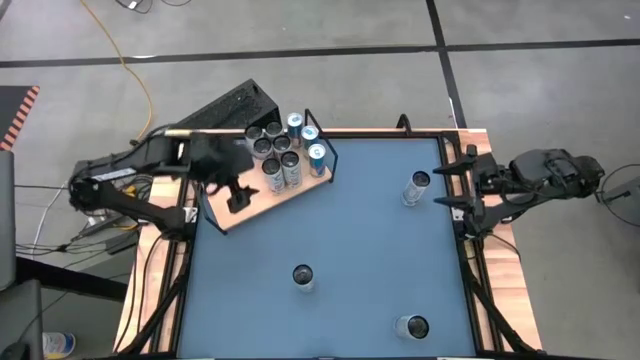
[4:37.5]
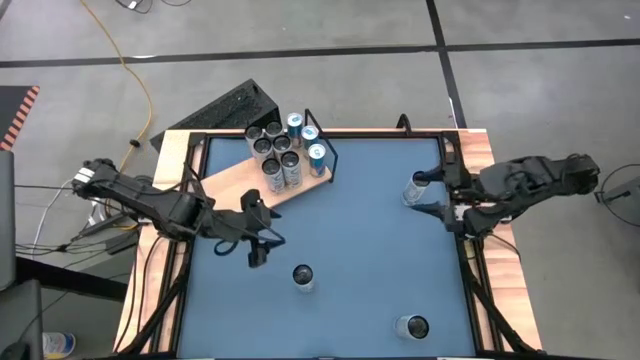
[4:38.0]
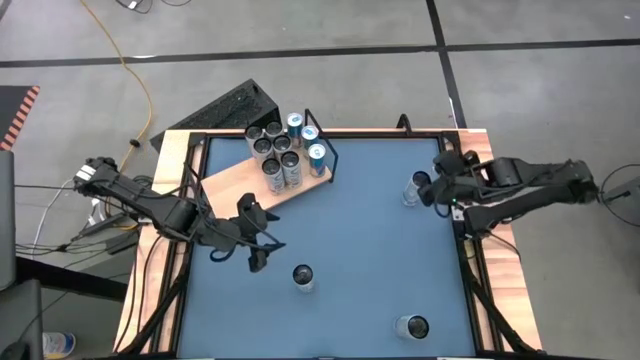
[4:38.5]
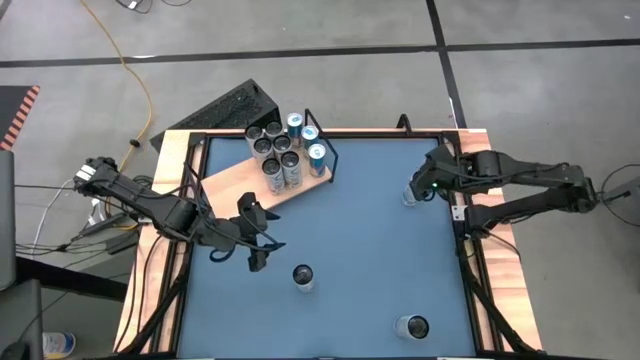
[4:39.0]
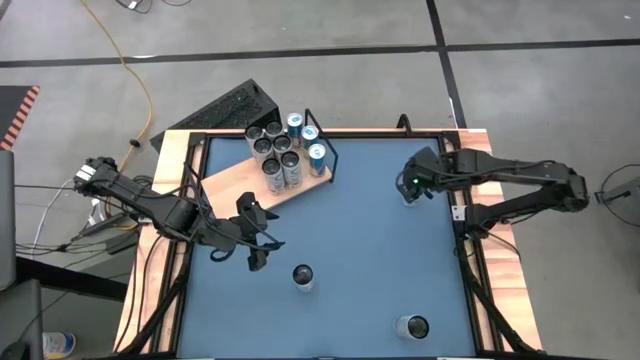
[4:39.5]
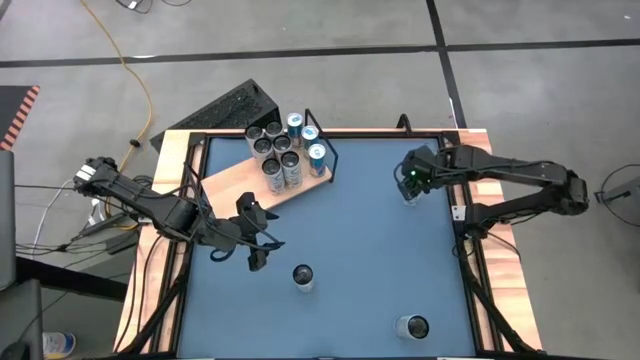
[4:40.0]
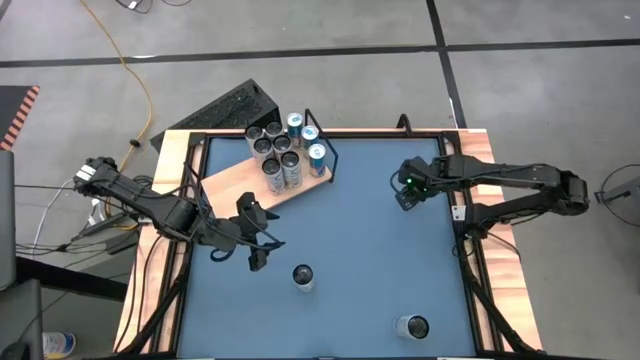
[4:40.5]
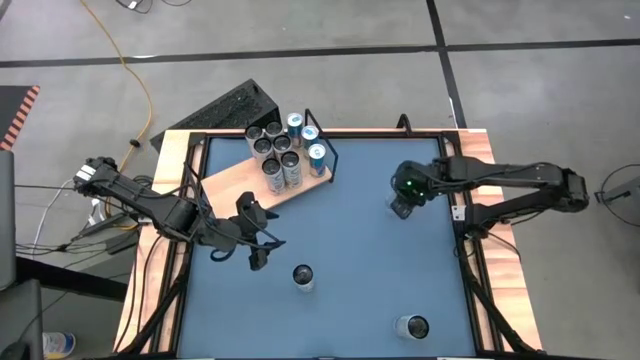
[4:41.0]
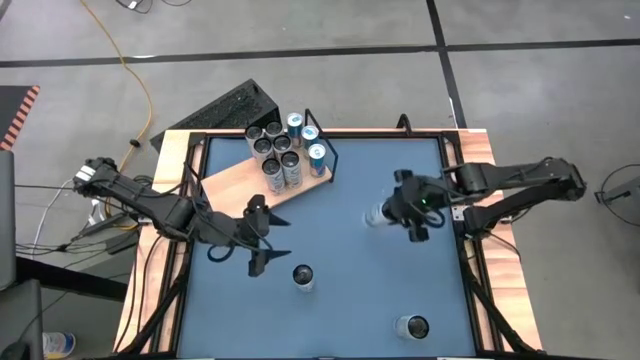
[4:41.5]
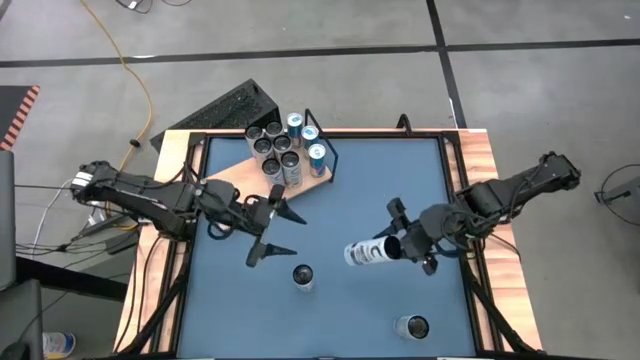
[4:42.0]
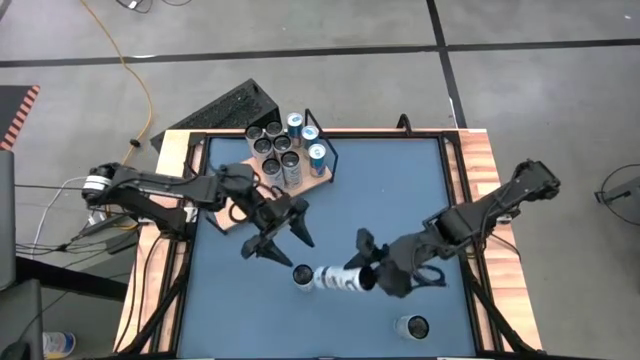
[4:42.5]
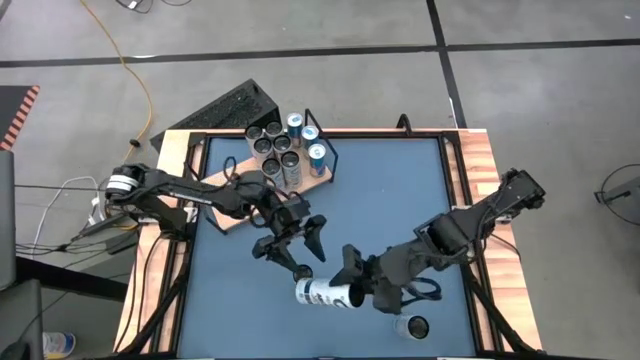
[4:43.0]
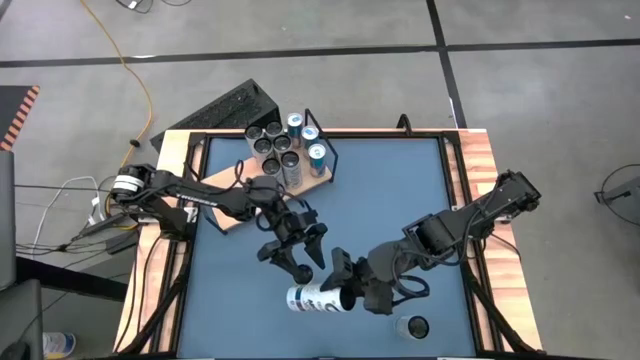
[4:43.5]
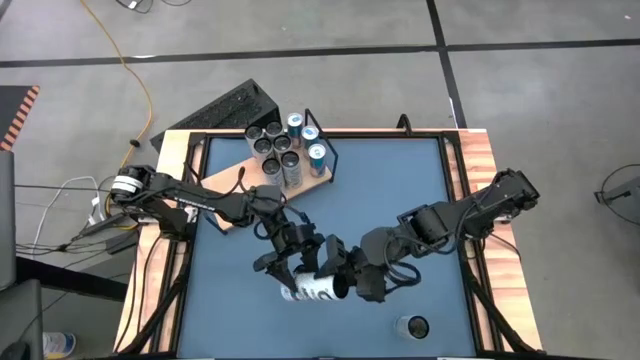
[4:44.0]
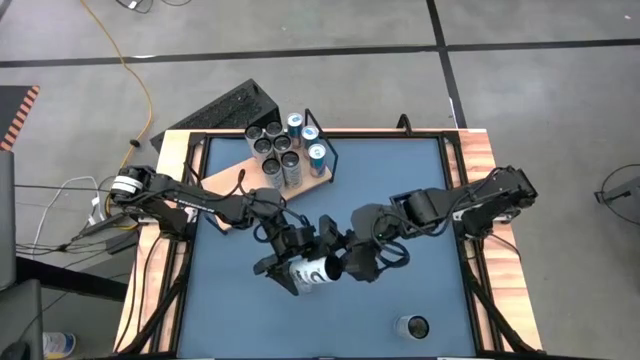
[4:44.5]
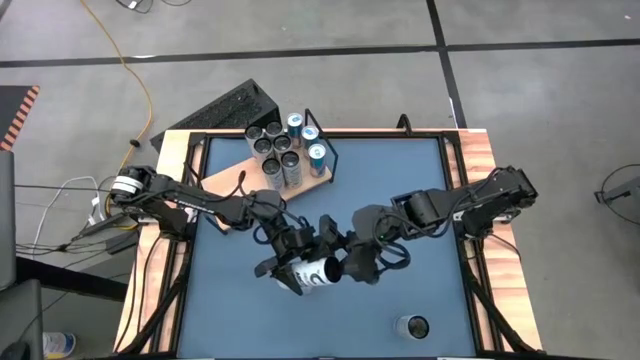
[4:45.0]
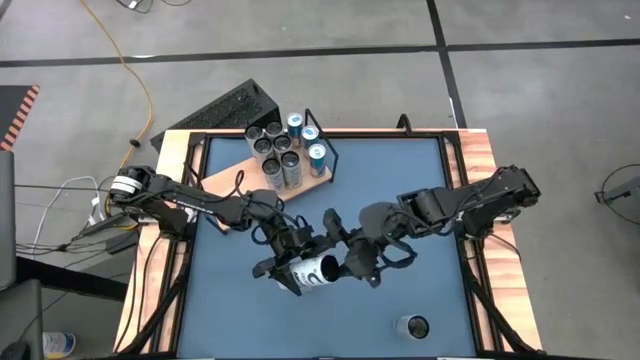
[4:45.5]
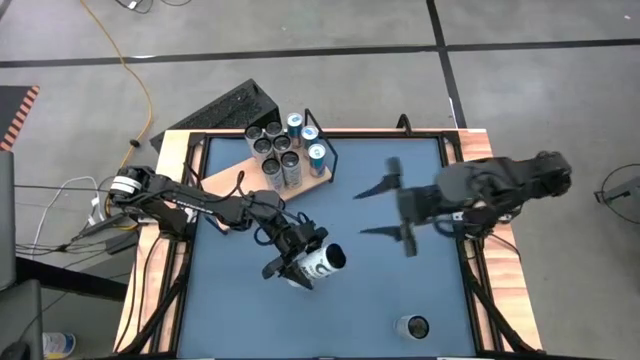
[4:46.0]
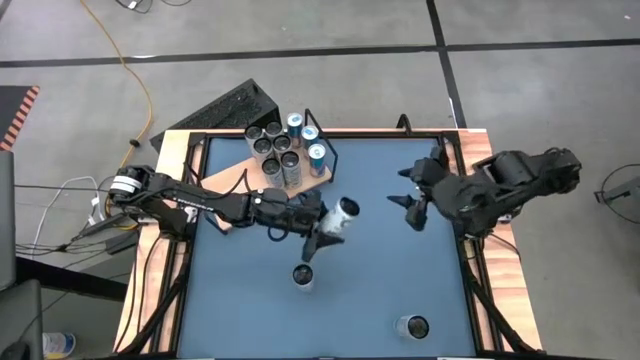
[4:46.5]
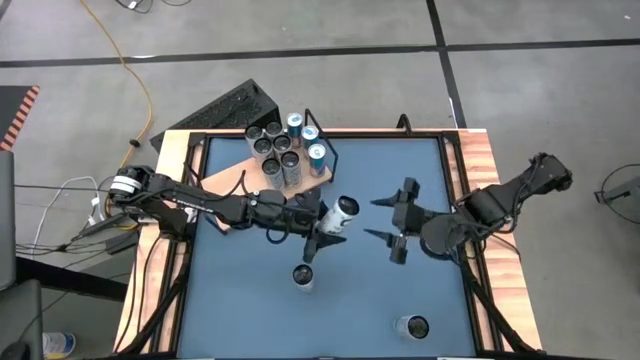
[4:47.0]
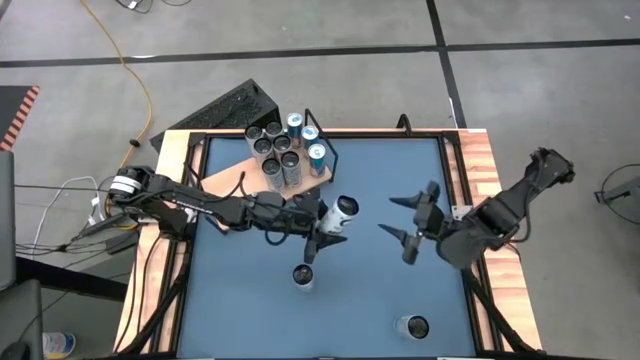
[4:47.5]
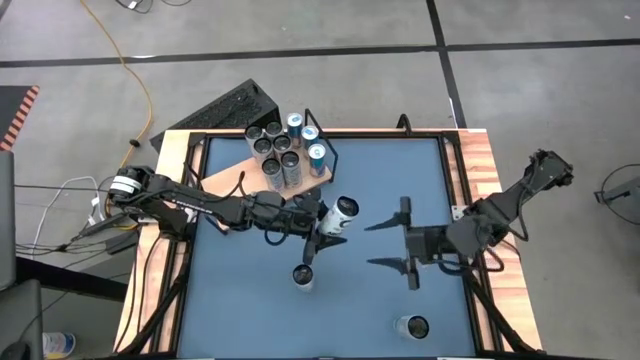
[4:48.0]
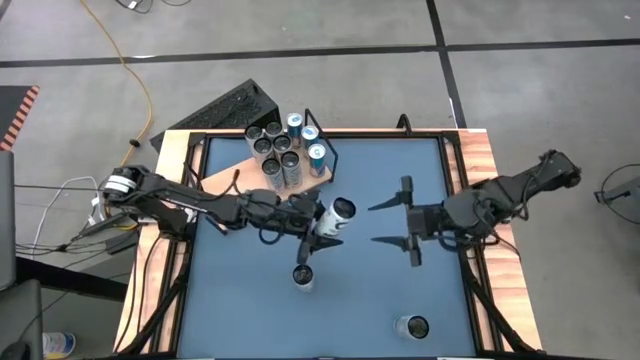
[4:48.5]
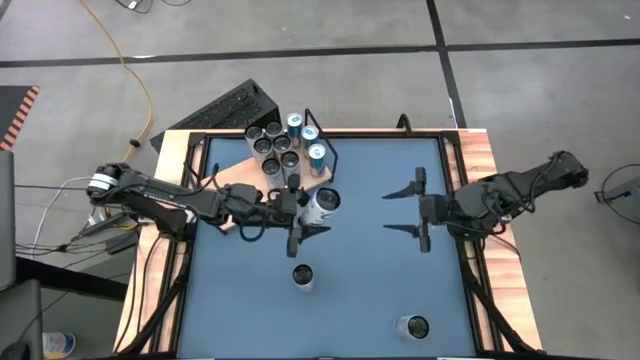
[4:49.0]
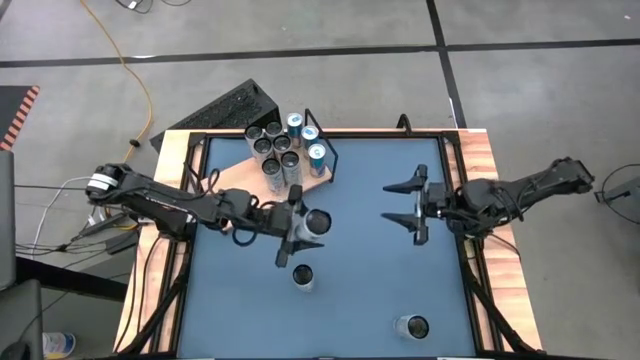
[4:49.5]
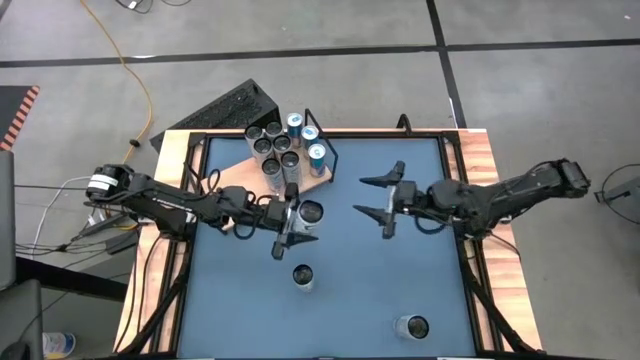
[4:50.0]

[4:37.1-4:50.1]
Task: Place canned beverage on shelf
Put the top right white and blue soda can on the shelf

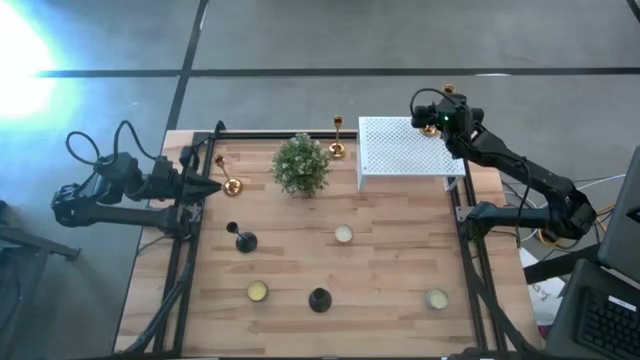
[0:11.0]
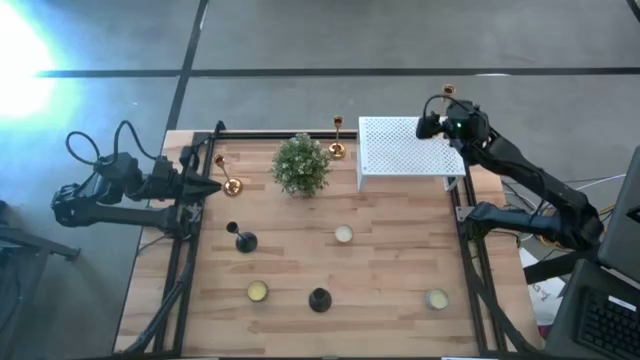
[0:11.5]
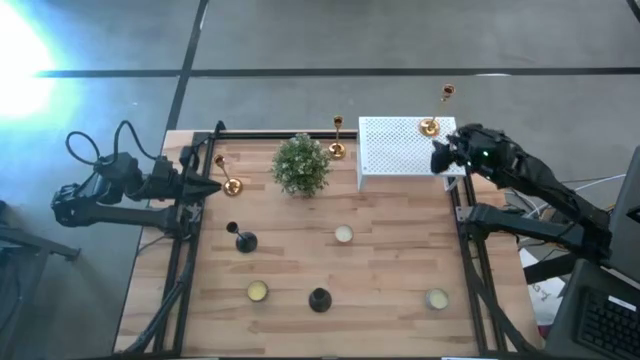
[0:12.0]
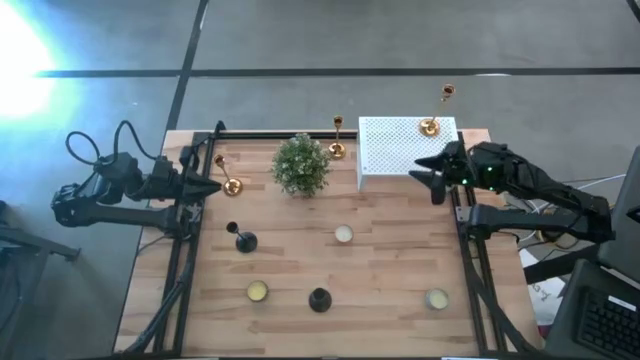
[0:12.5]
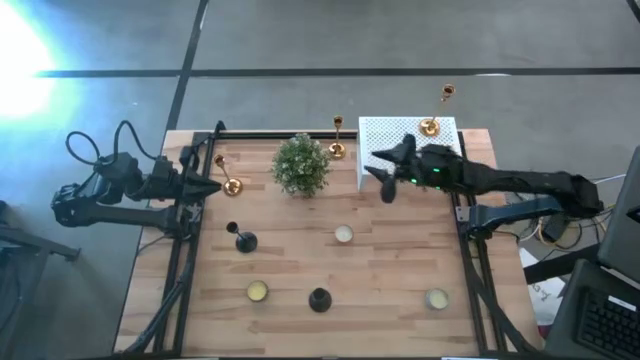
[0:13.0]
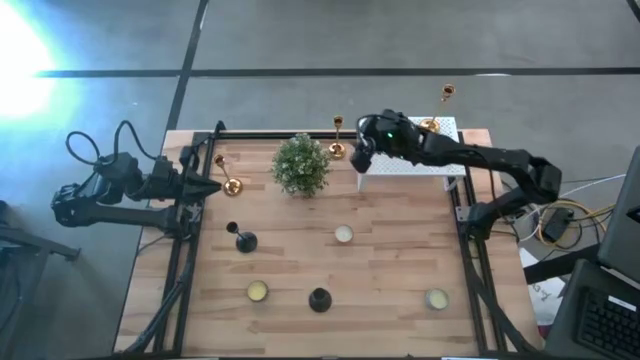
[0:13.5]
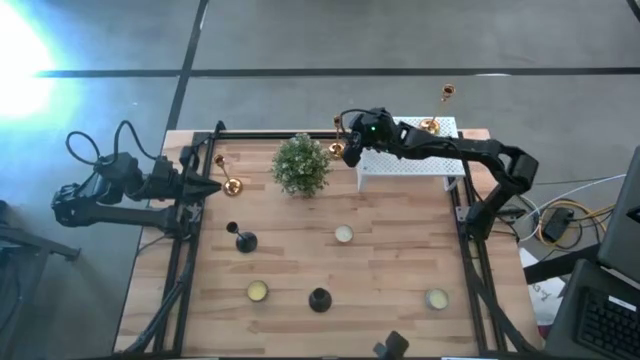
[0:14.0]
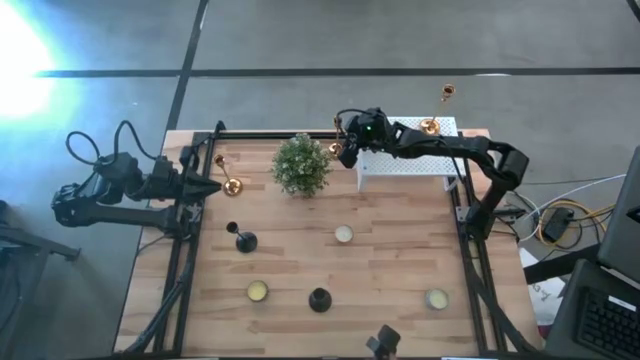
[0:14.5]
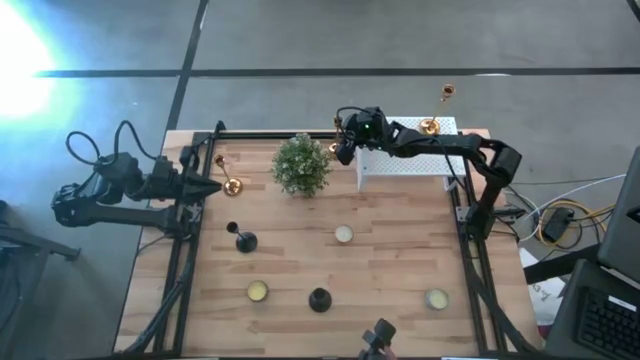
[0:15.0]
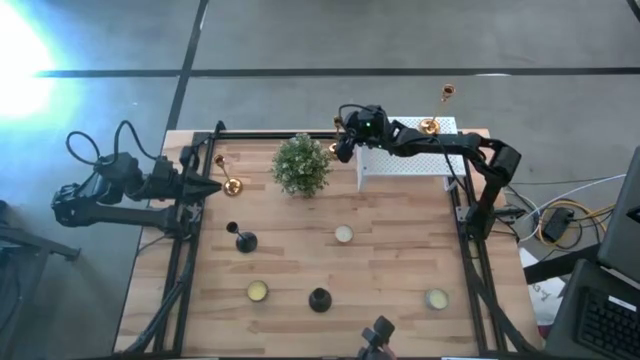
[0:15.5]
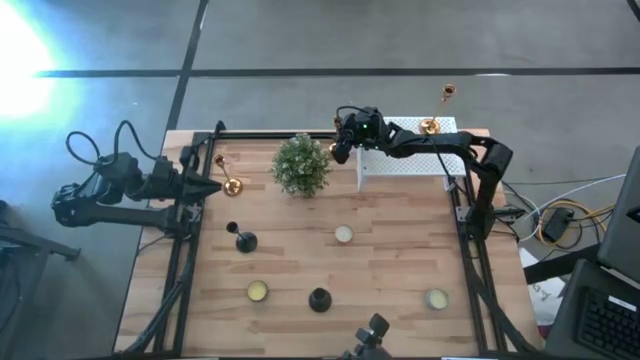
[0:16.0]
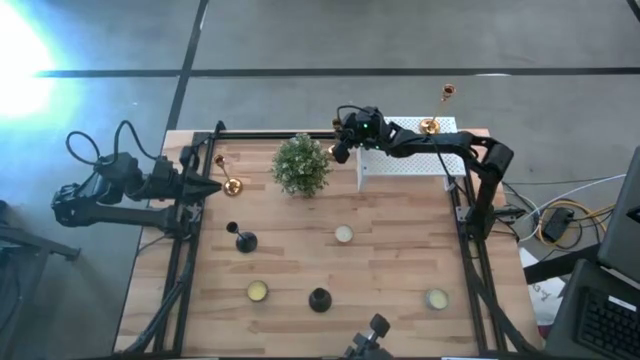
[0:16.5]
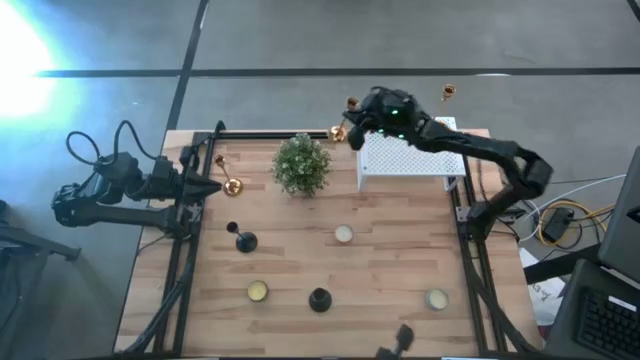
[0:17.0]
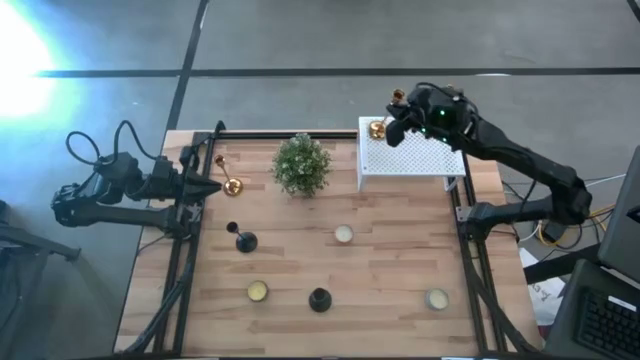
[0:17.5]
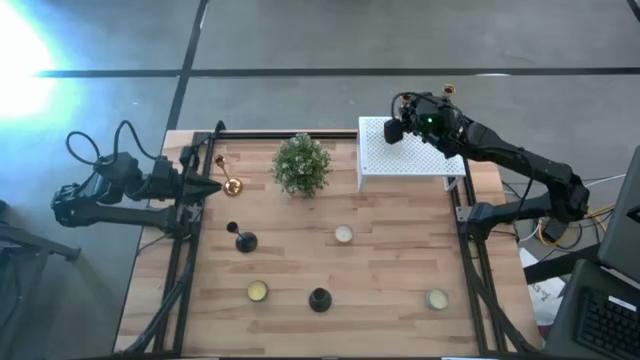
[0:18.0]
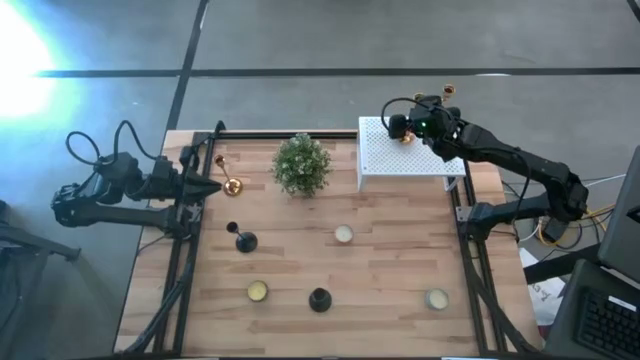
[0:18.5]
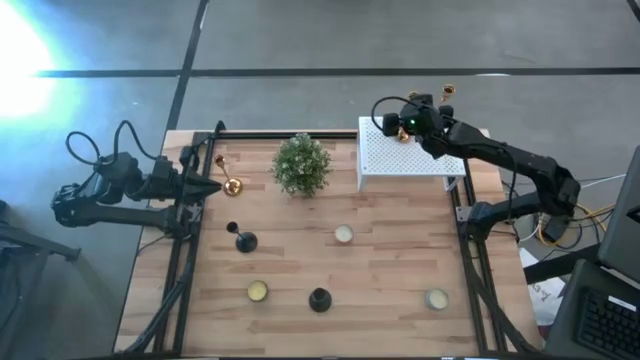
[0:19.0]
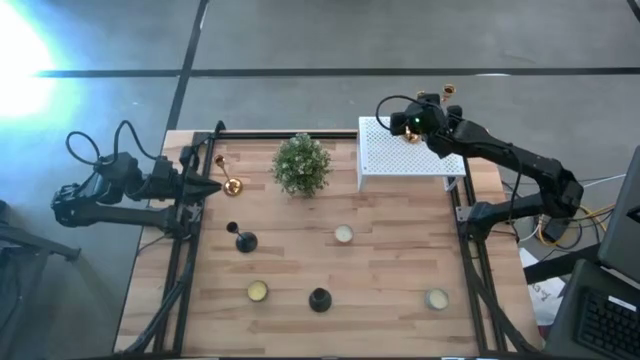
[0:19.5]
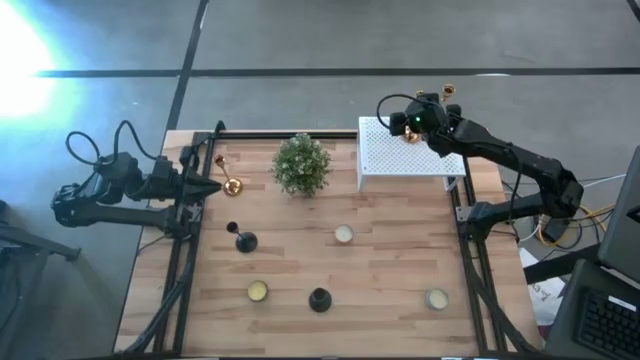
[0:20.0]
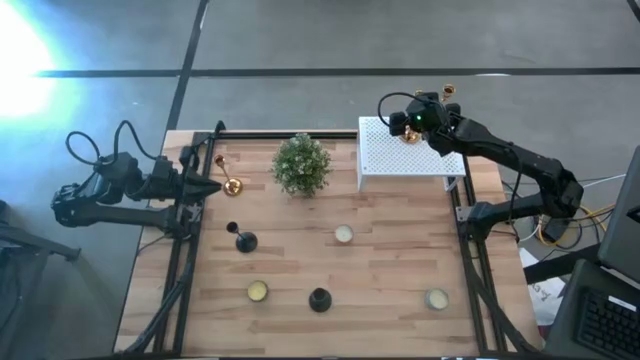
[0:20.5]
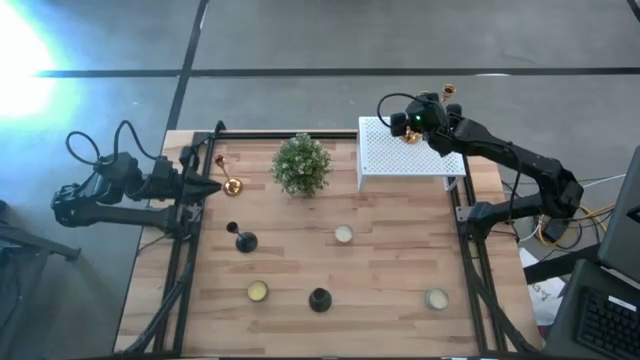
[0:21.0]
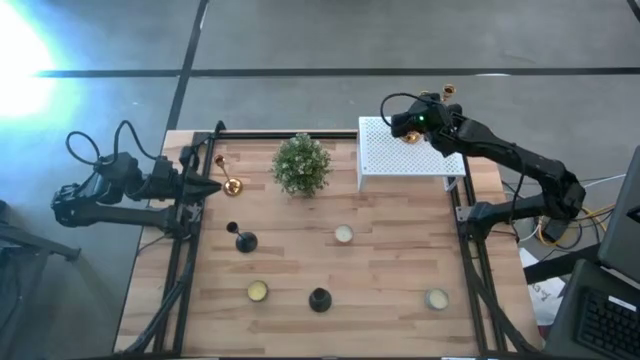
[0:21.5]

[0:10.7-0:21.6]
Task: Pick & Place candle stick holders
Put the top gold candle holder on the shelf
